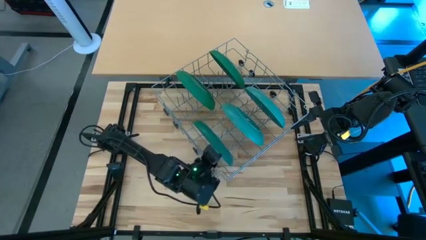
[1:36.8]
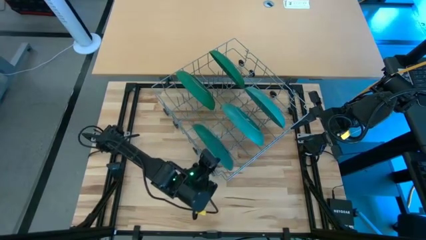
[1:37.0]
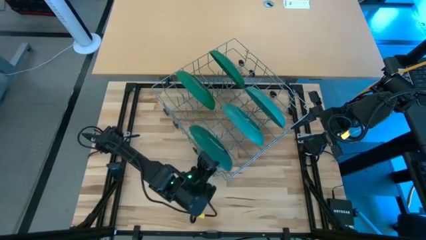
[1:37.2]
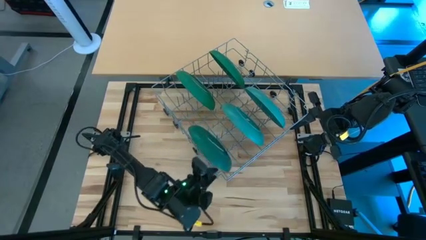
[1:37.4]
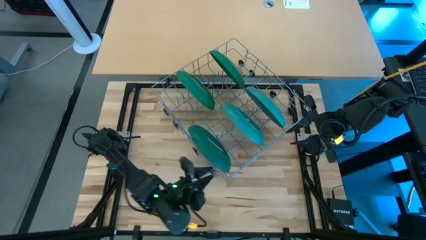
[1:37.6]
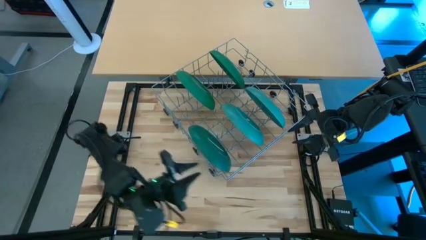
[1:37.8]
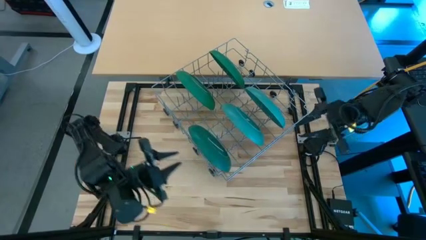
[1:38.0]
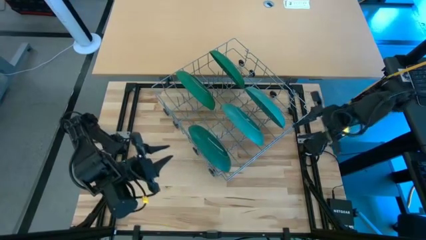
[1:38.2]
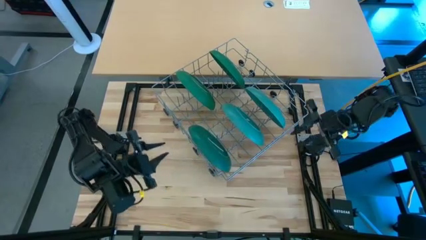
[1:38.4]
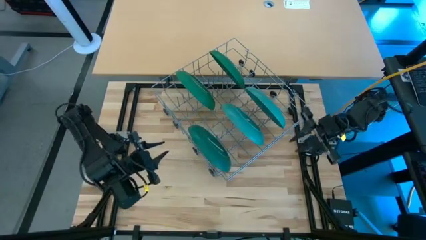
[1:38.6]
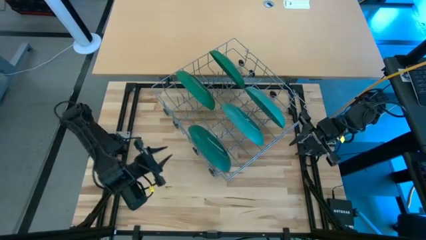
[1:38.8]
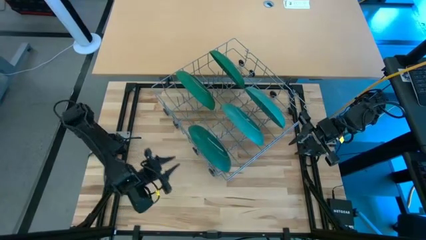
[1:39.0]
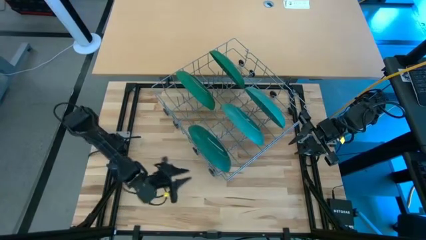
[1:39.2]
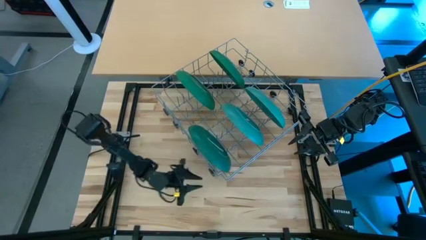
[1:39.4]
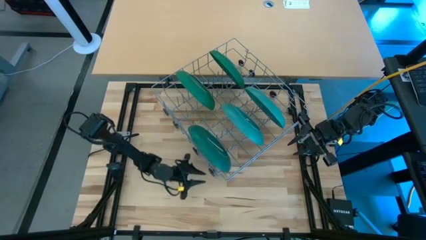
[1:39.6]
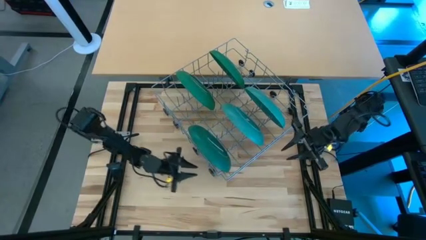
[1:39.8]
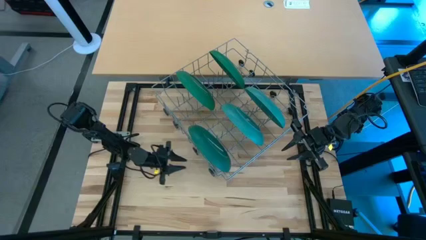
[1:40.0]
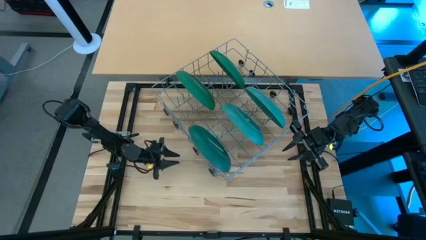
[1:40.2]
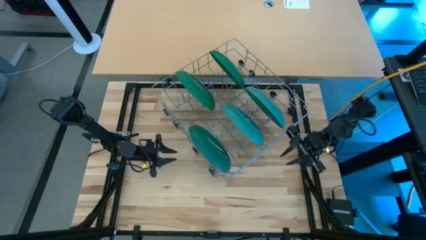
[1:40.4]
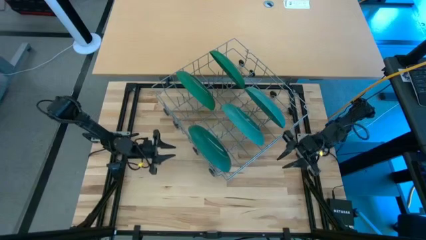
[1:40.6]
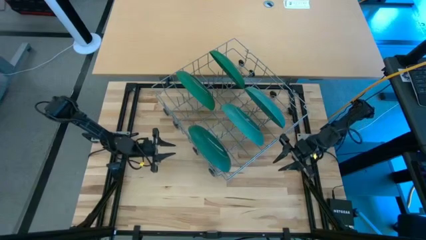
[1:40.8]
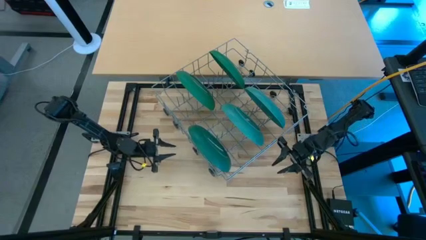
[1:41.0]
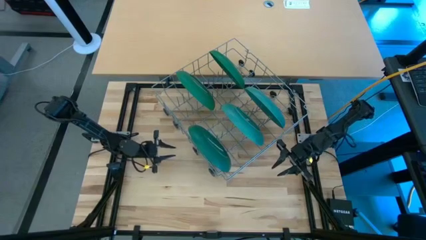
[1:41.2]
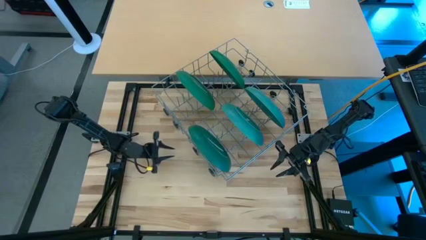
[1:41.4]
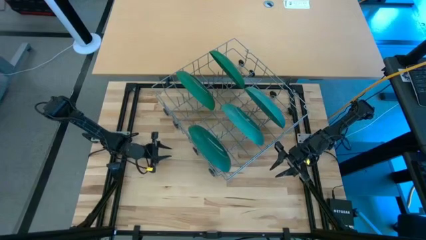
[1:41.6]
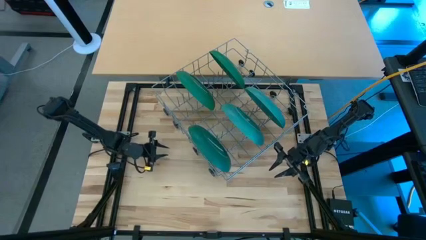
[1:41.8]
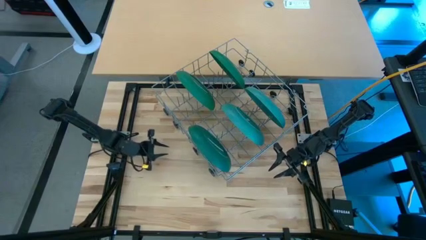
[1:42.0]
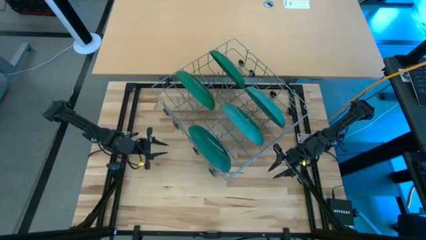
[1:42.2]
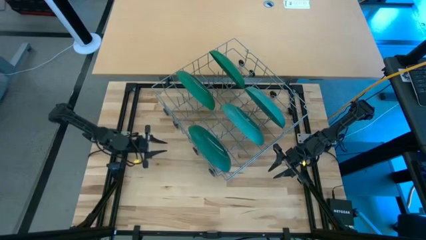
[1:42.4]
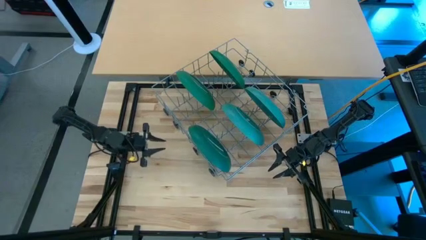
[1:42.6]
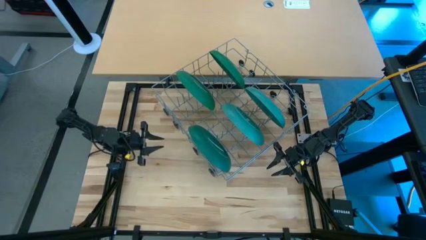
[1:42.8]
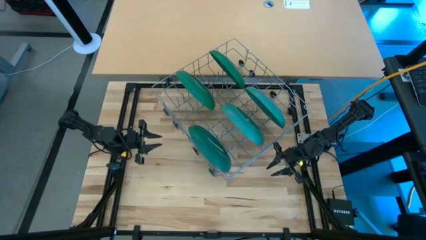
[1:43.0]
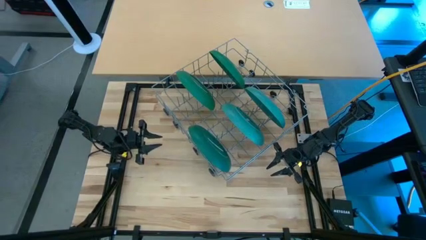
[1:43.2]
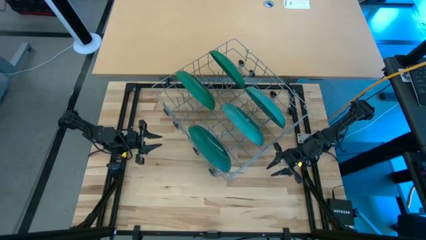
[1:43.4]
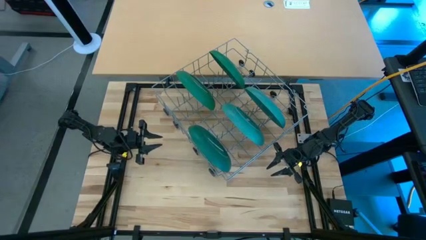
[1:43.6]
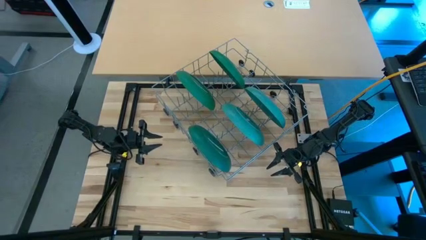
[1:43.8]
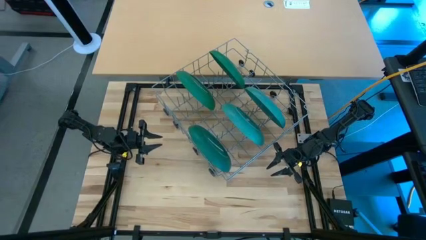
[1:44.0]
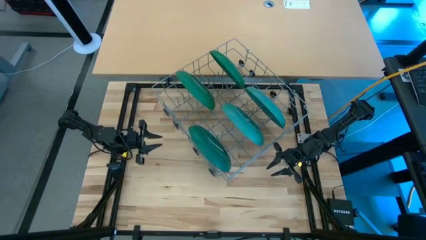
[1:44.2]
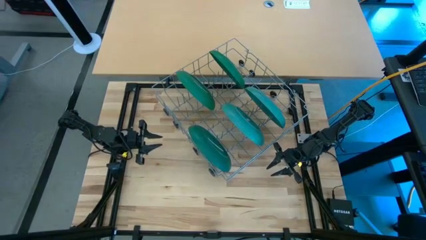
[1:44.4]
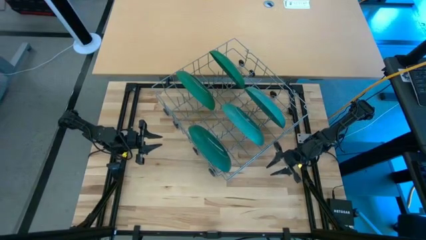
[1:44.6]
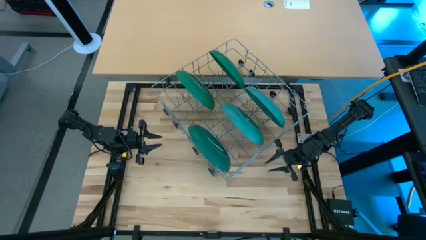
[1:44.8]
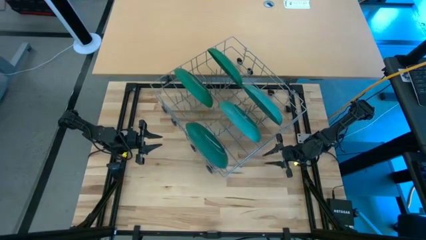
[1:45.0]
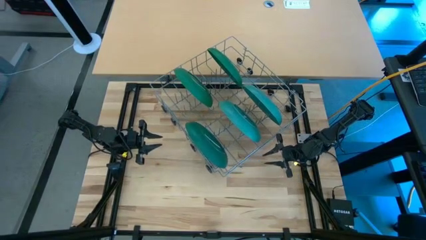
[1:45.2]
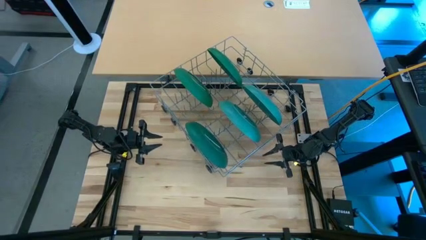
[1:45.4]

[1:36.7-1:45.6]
Task: Sort dishes
Return to Home Position

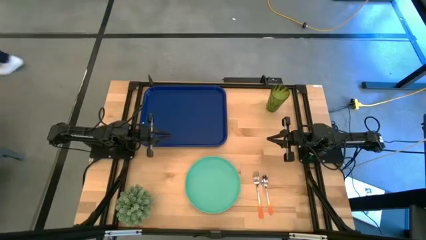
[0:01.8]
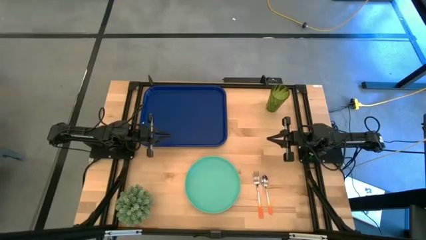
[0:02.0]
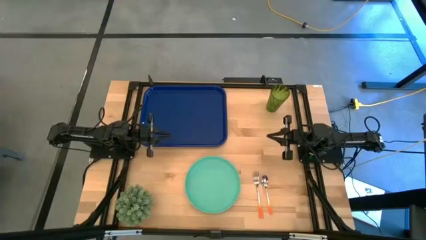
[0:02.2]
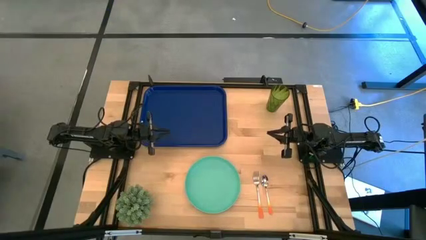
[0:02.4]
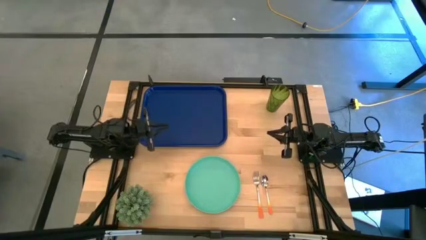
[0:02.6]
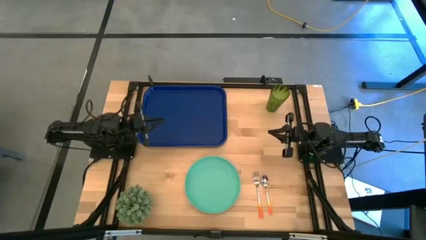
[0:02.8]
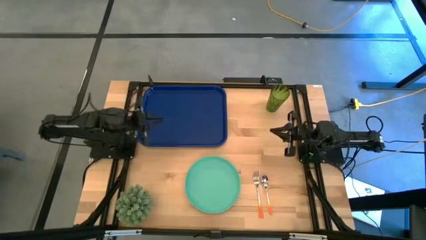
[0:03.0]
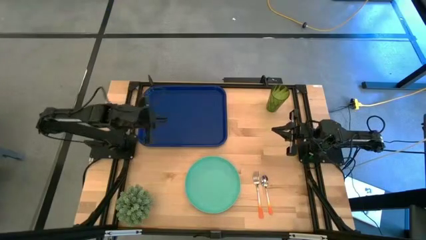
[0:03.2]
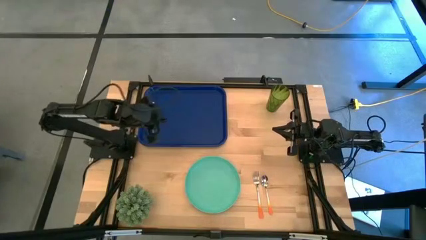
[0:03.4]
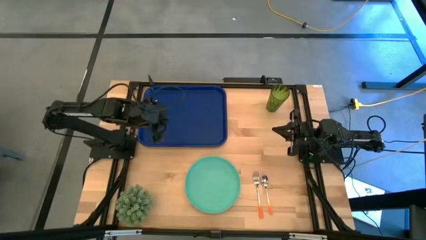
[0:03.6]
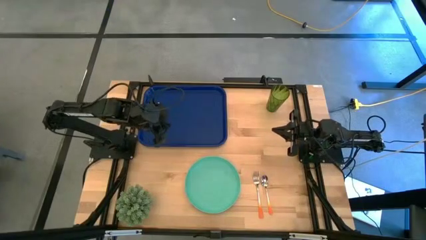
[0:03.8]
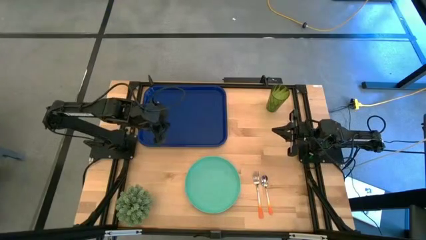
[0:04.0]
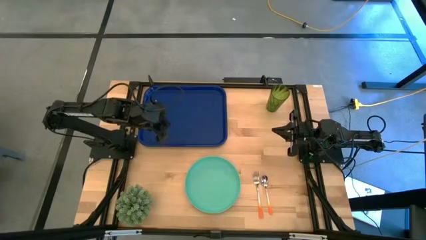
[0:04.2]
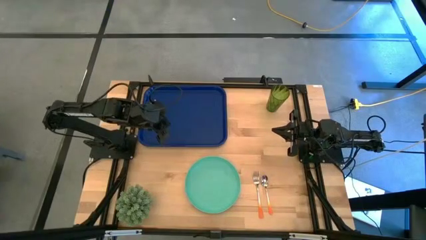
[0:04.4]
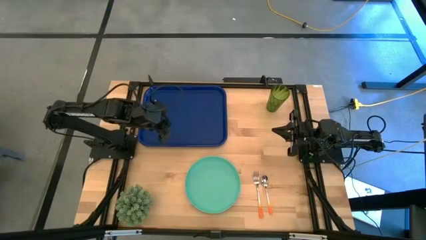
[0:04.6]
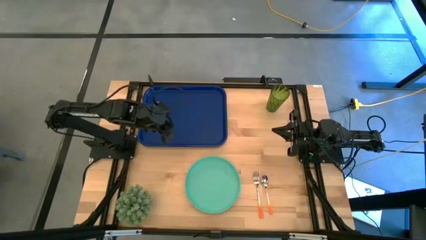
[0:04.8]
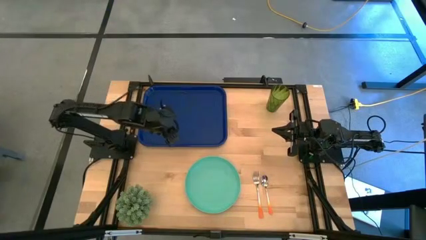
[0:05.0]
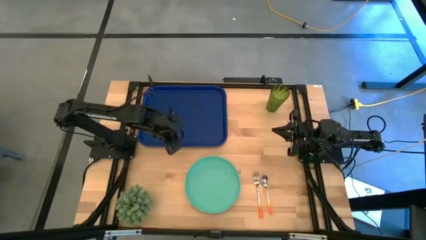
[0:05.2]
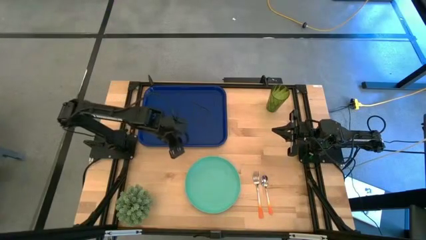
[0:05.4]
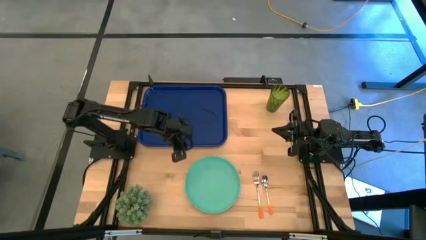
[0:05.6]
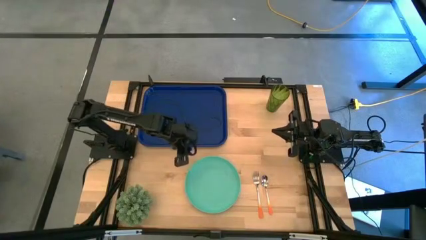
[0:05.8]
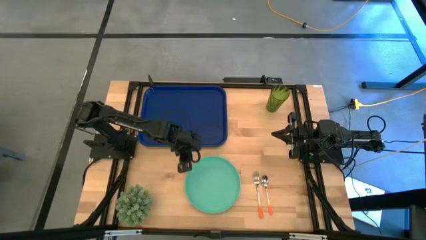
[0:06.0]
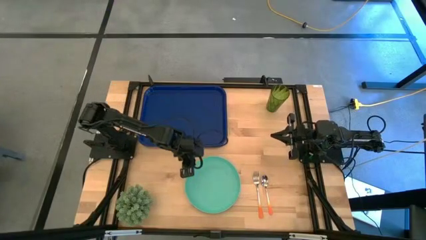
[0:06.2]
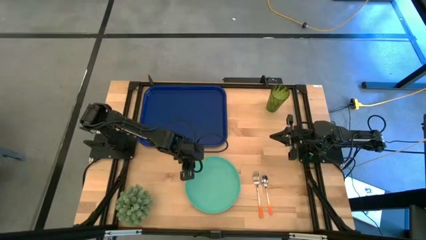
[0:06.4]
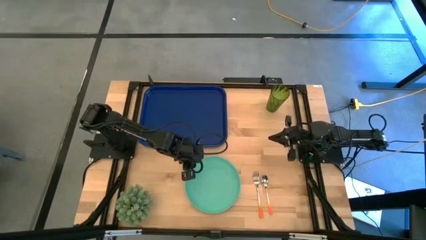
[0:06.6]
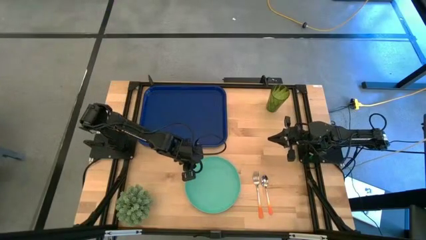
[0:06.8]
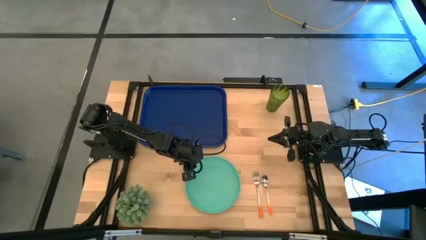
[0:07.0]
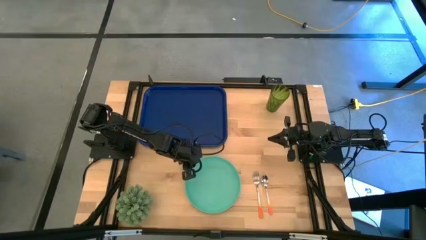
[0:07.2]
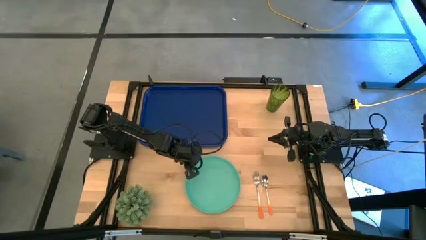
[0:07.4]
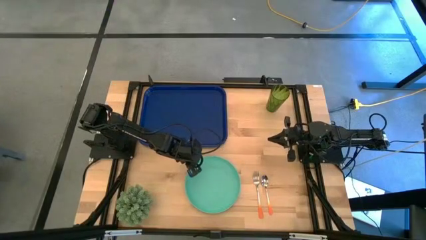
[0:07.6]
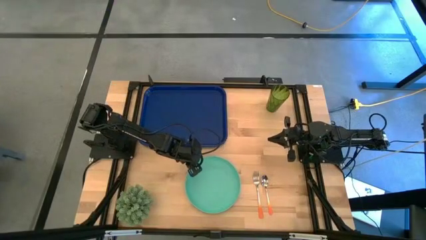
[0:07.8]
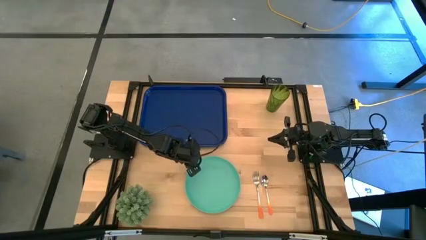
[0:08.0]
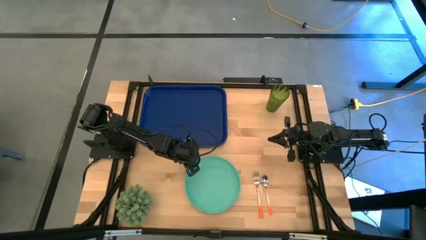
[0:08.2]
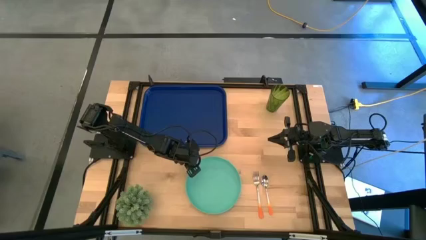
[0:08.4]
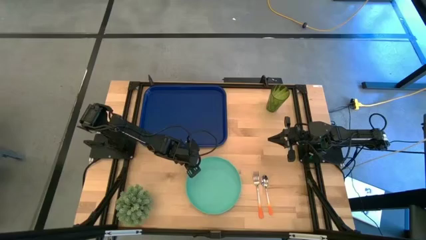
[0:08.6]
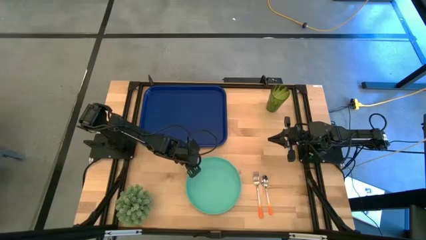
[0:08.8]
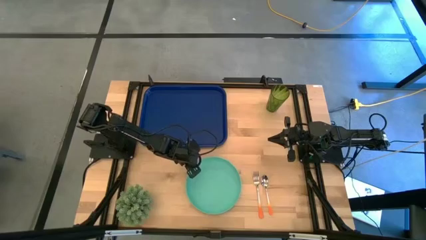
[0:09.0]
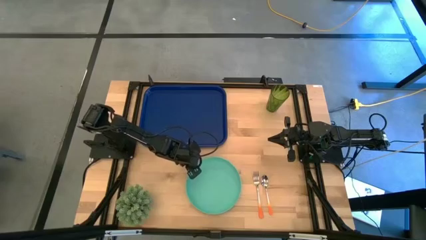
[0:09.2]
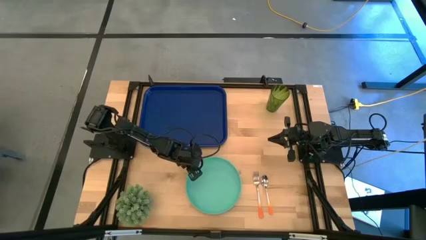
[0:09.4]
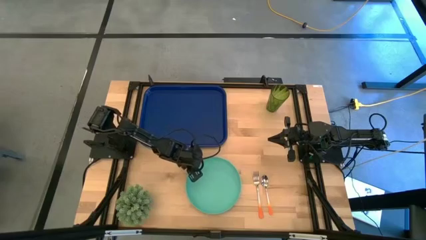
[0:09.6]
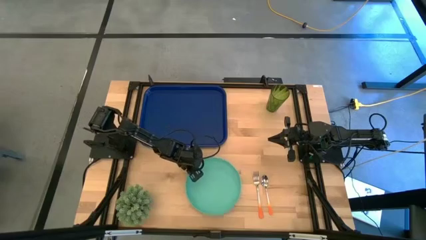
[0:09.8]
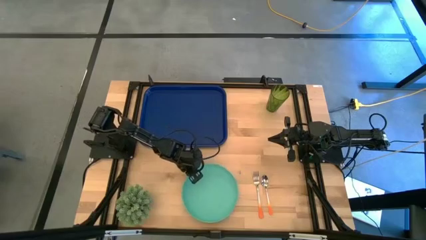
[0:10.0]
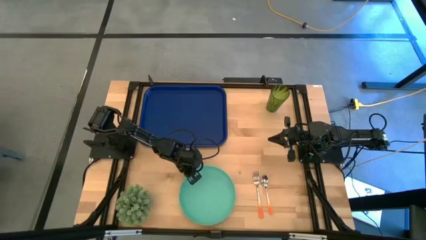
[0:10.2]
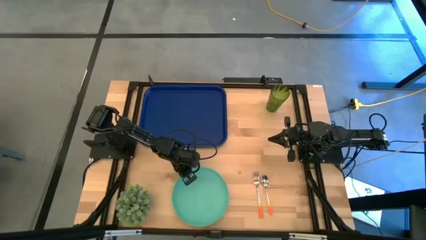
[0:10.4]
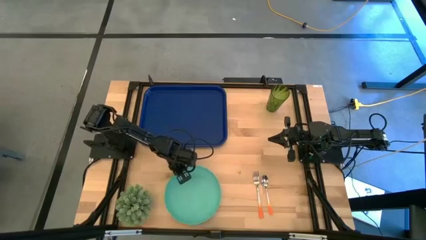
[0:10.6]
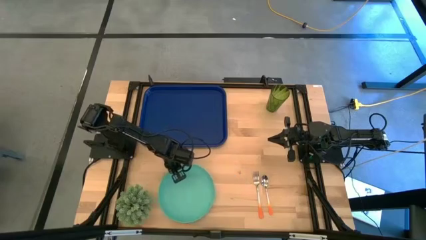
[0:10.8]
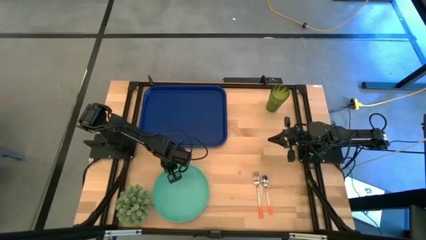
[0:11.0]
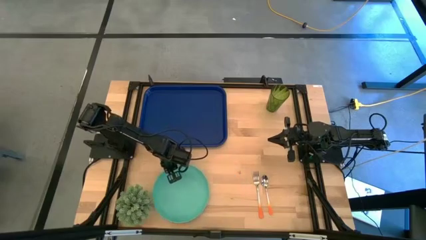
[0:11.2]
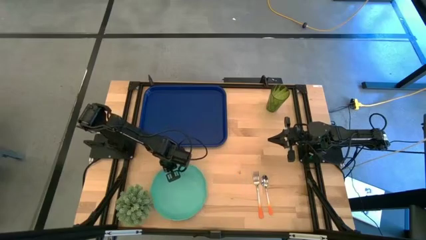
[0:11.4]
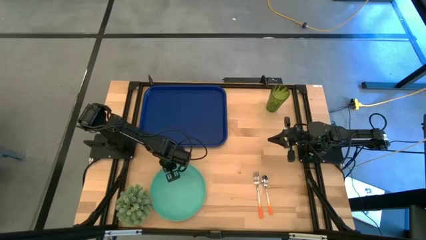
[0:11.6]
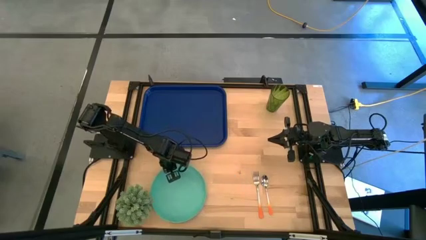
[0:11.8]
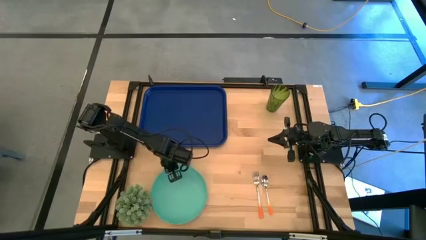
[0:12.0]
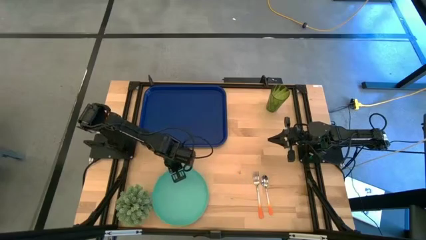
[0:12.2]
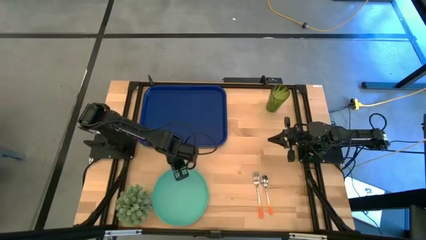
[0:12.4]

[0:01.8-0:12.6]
Task: Pick and place plate/cup/fork/spoon on tray
Adjust the green plate
